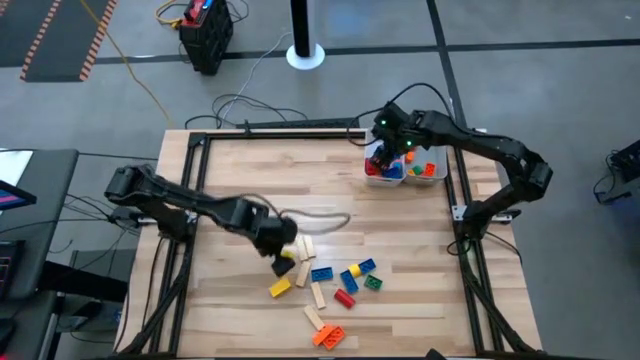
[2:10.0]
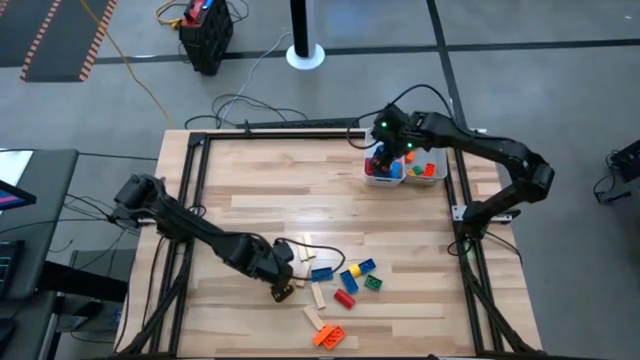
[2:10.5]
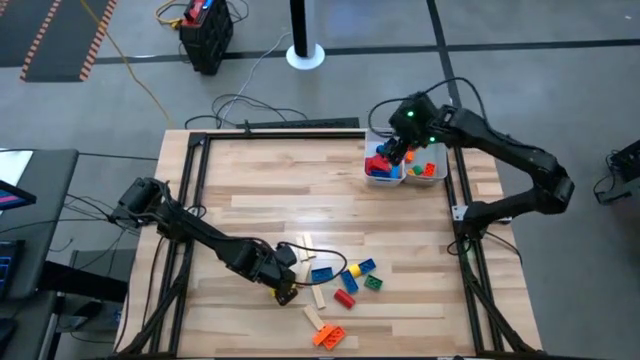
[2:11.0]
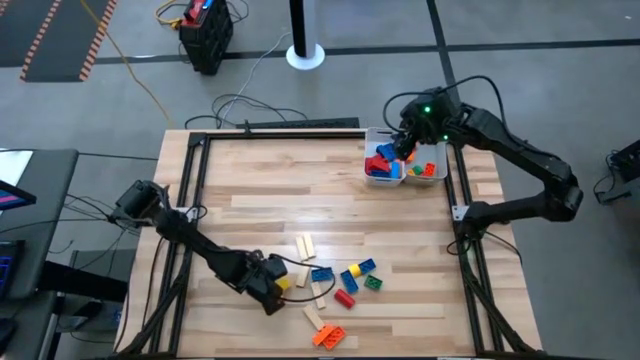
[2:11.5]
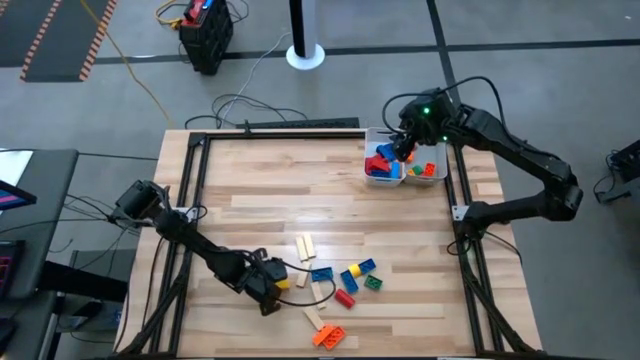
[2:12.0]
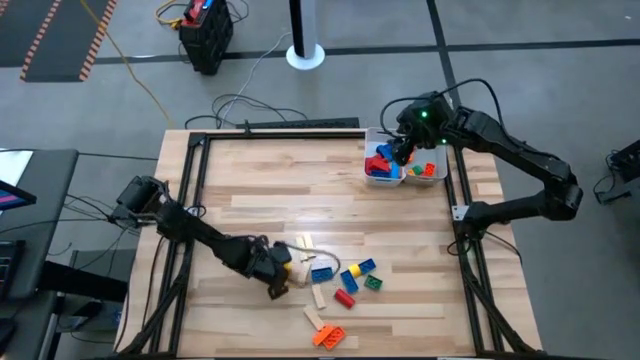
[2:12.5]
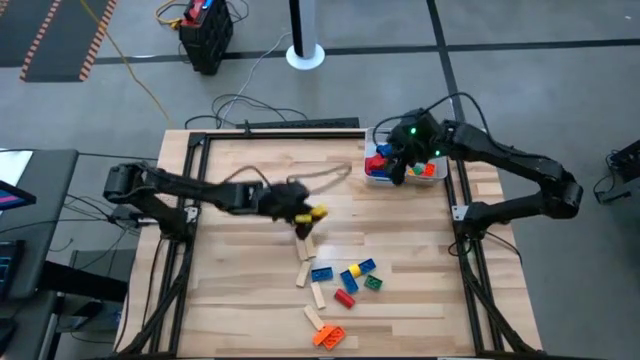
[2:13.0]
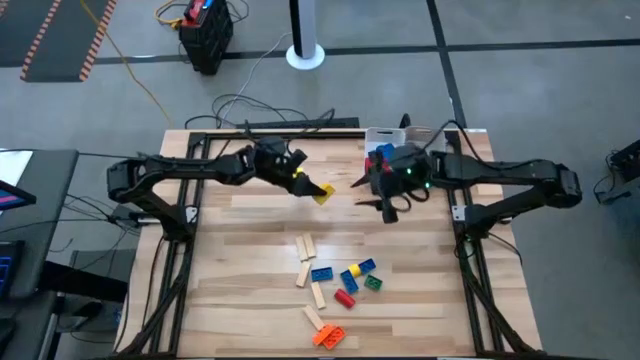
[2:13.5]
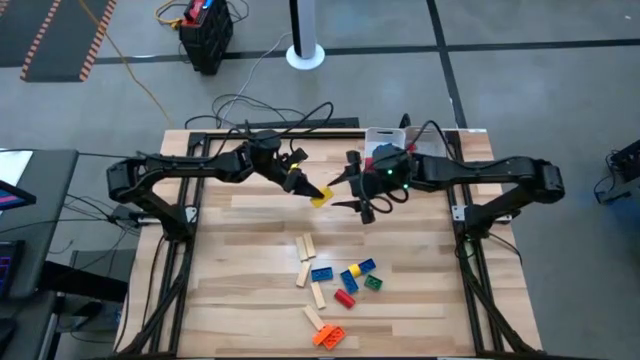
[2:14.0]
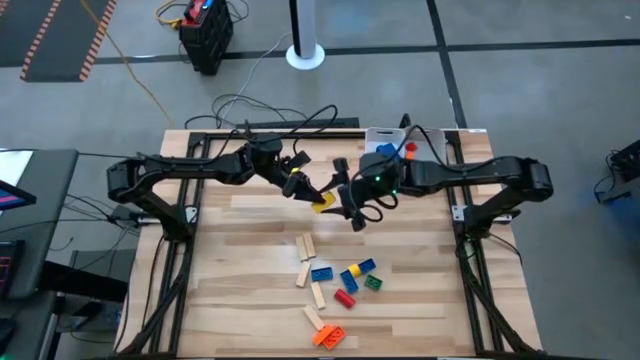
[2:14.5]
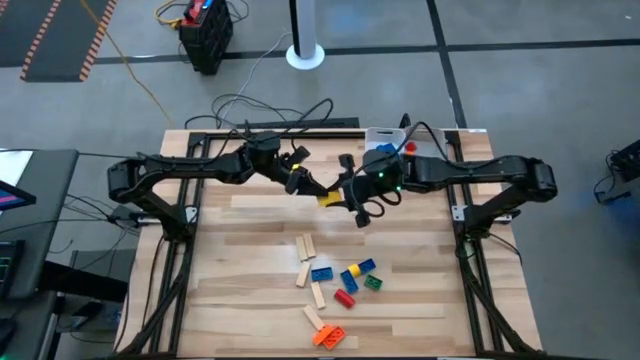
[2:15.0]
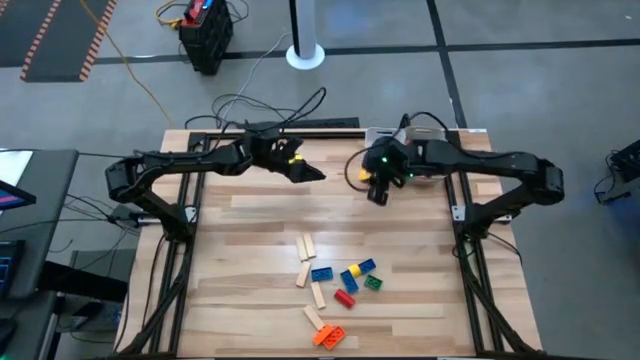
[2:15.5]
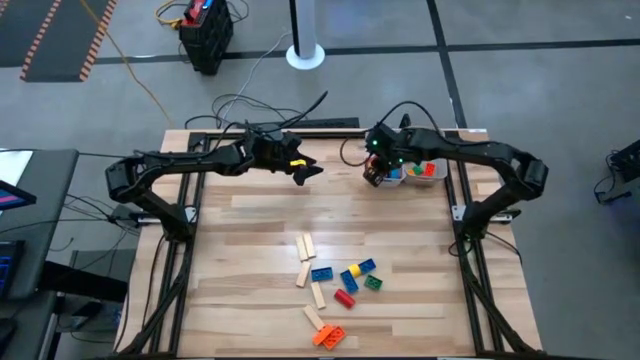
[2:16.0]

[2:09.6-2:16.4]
Task: Sort blocks by size
Put the large yellow wooden block into the white bin

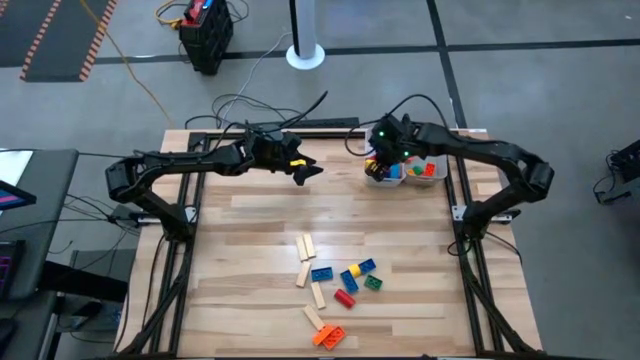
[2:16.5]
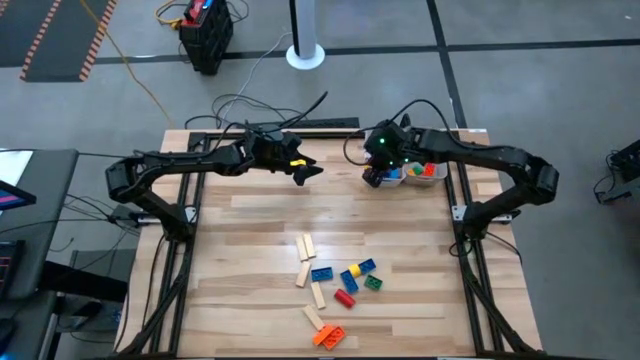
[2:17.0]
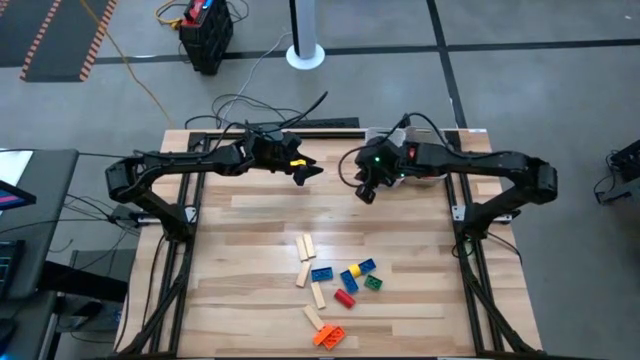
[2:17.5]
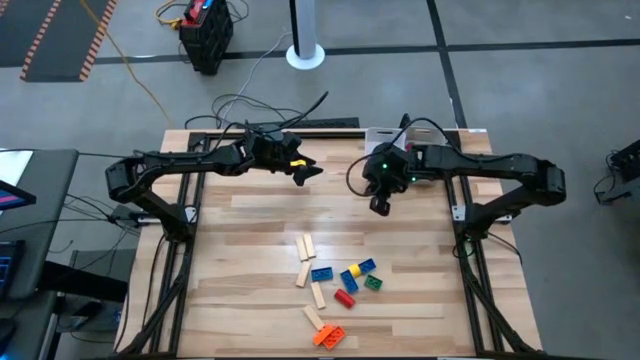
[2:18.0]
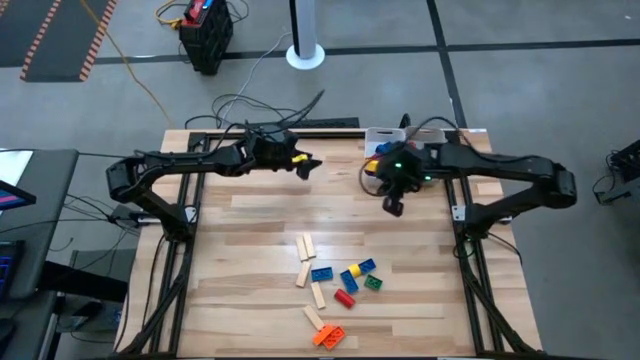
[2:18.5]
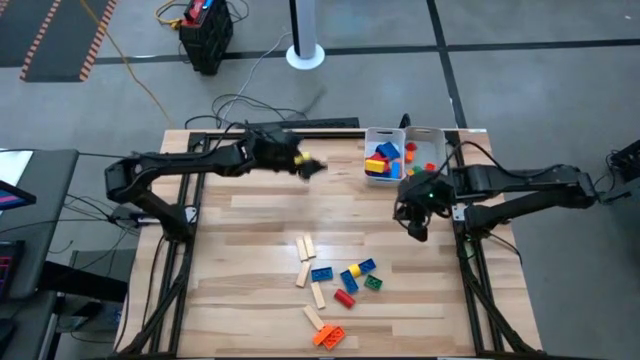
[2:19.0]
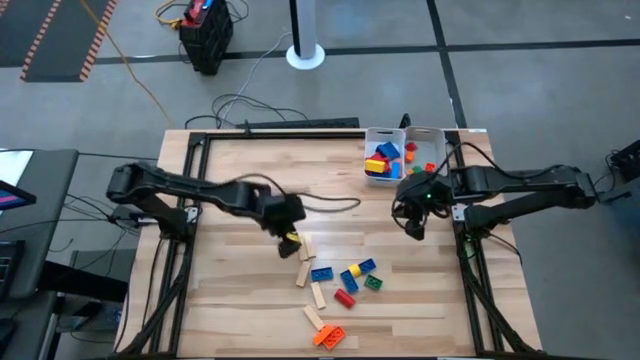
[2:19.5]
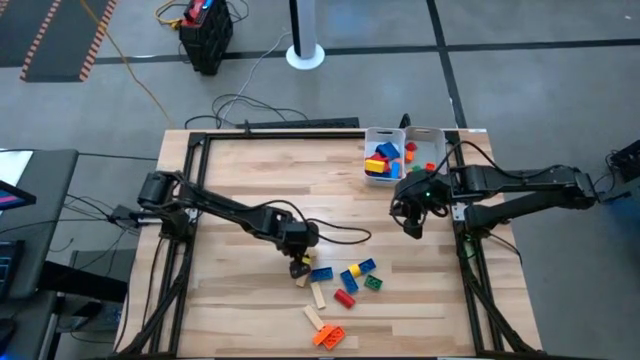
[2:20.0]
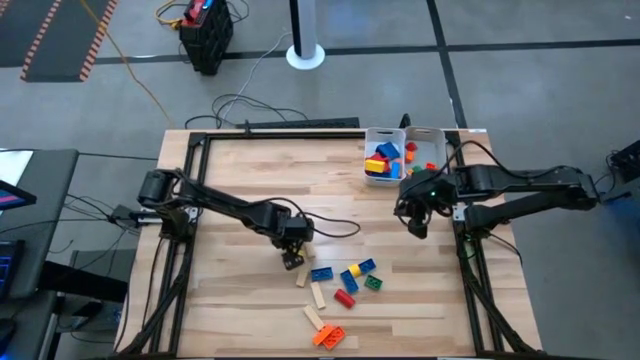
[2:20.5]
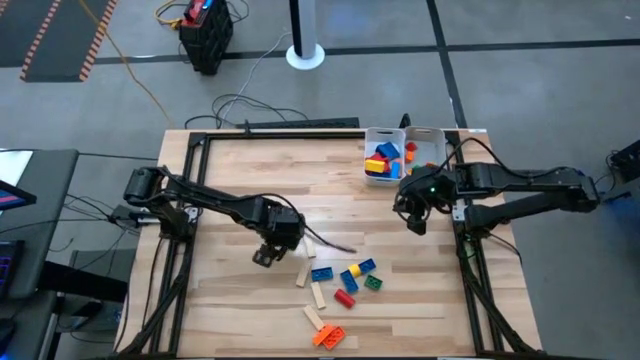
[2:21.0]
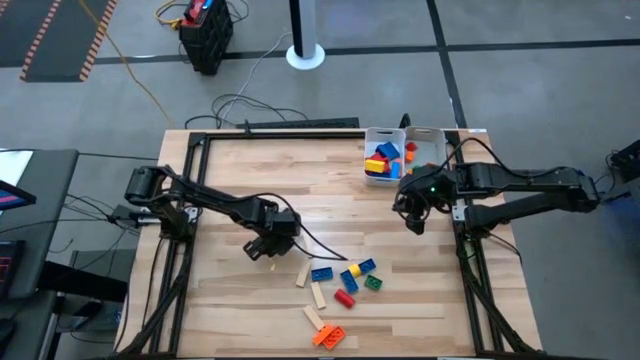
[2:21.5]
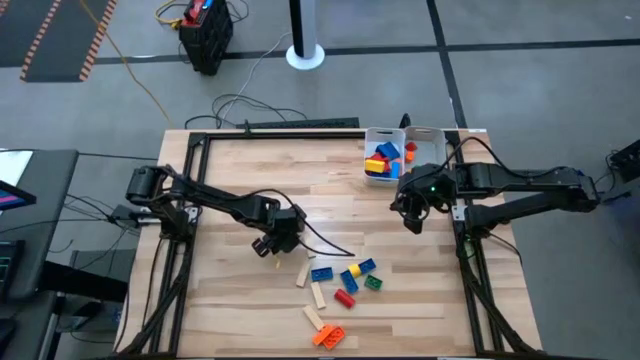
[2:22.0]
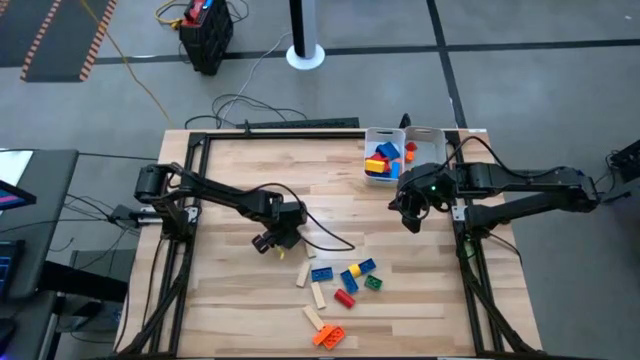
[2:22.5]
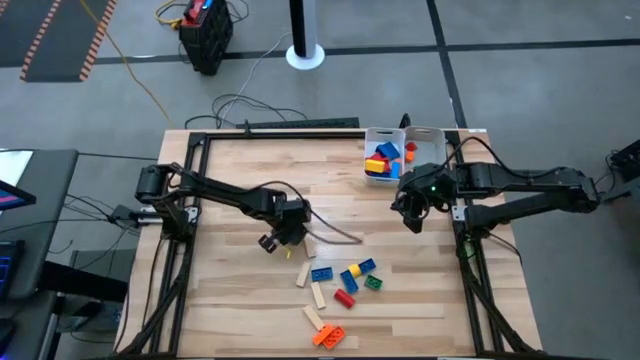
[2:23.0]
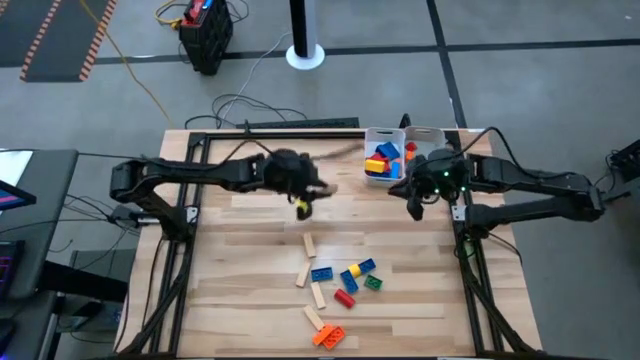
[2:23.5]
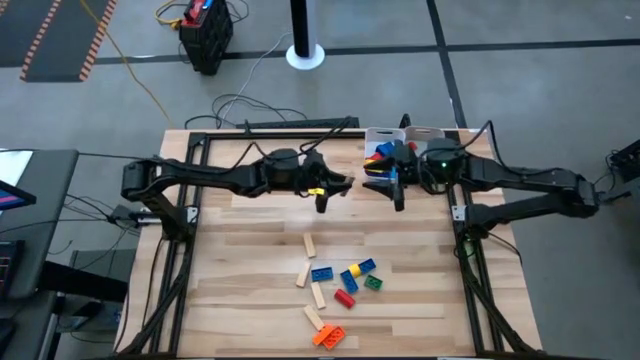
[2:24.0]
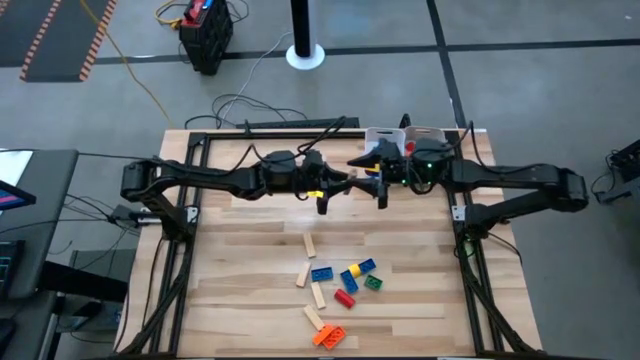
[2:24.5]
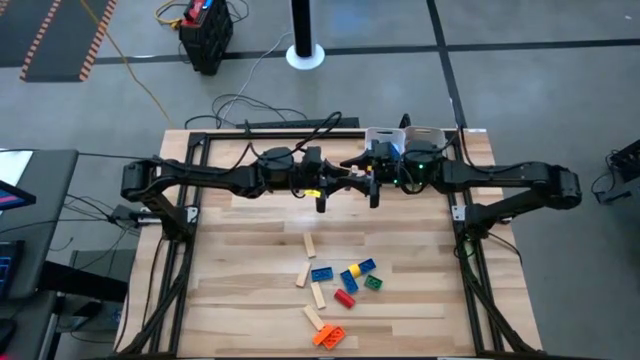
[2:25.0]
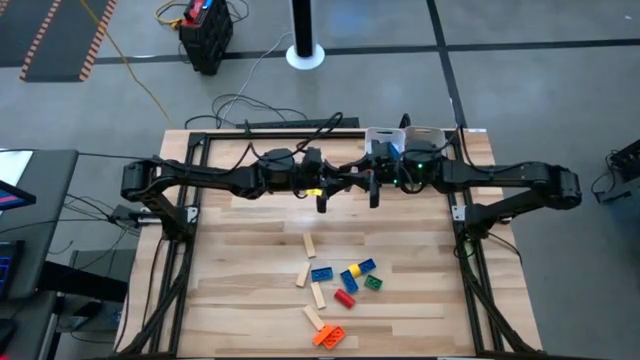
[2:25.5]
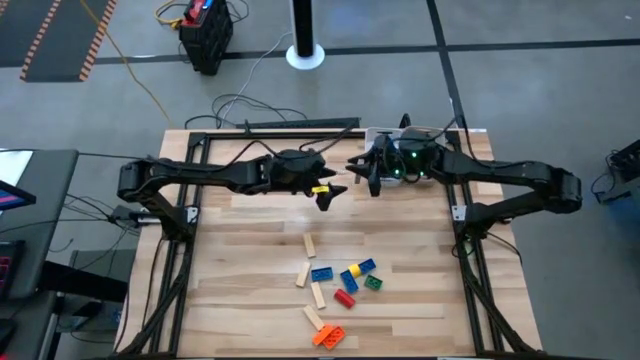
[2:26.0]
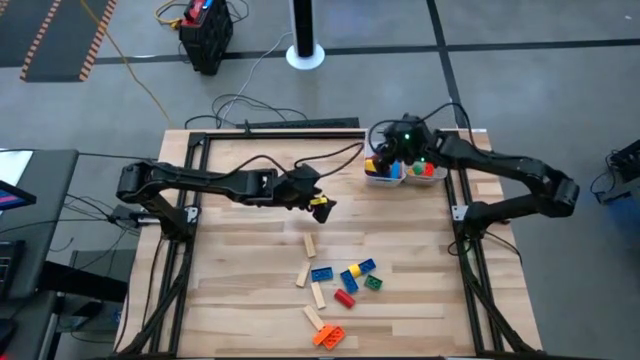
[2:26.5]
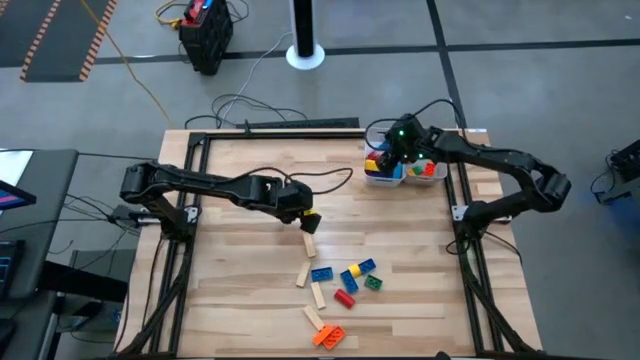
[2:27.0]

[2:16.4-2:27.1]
Put the large beige wooden block into the white bin

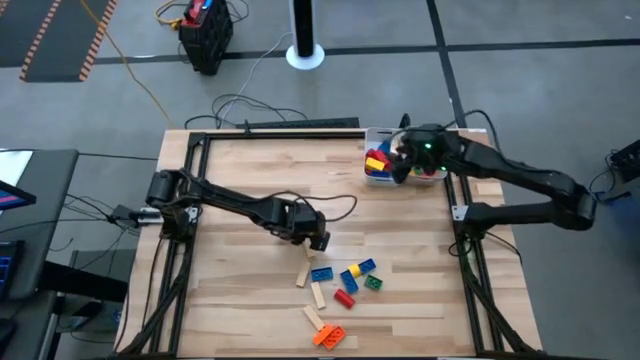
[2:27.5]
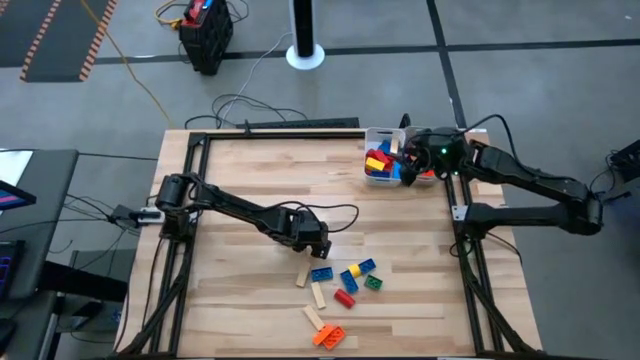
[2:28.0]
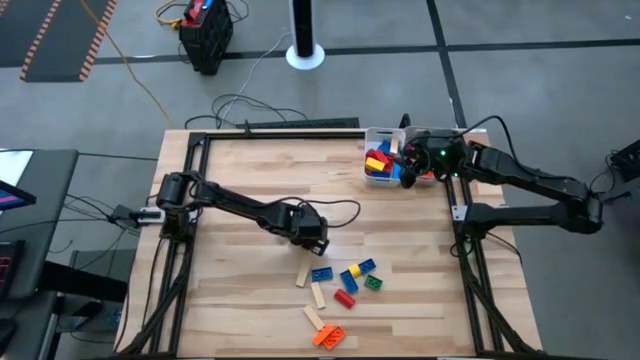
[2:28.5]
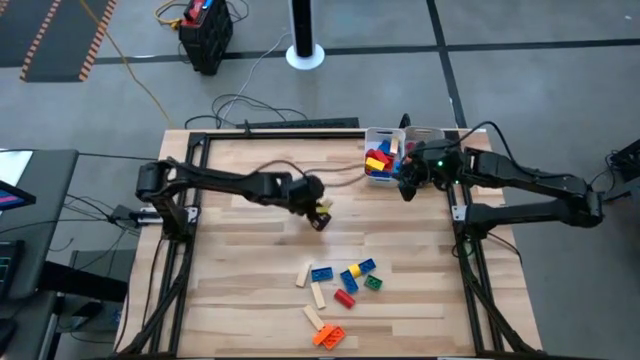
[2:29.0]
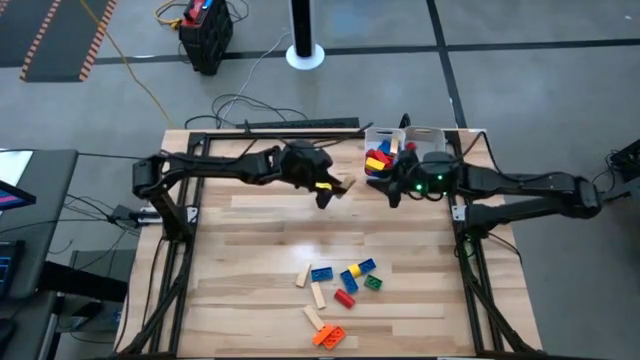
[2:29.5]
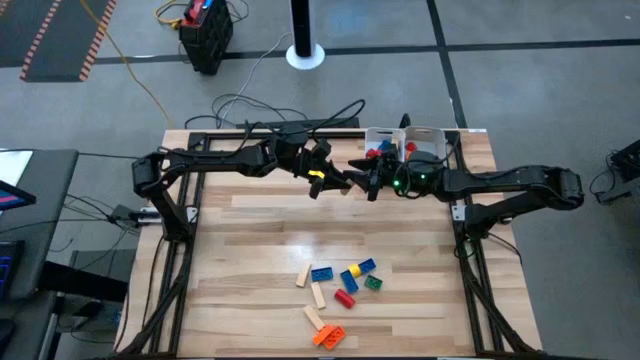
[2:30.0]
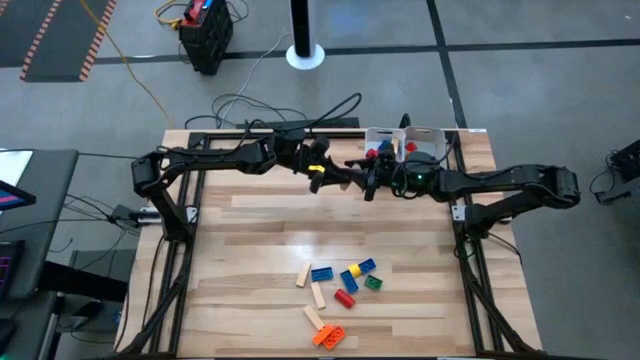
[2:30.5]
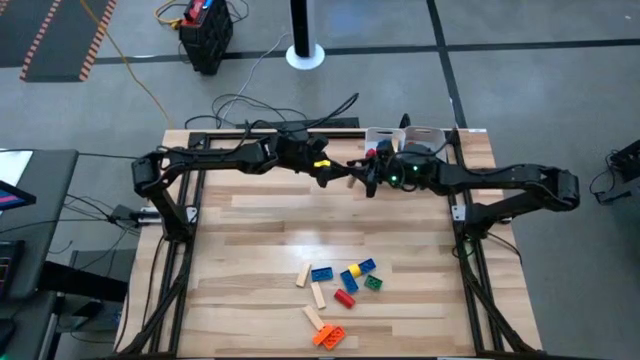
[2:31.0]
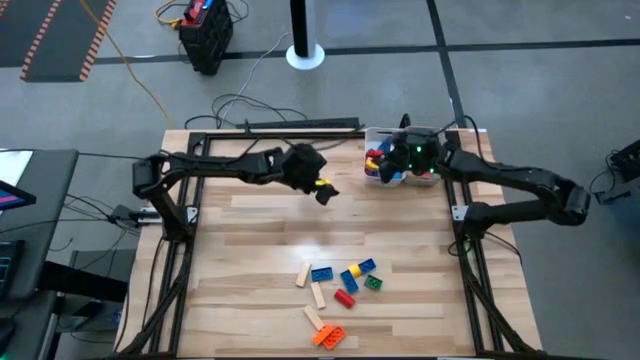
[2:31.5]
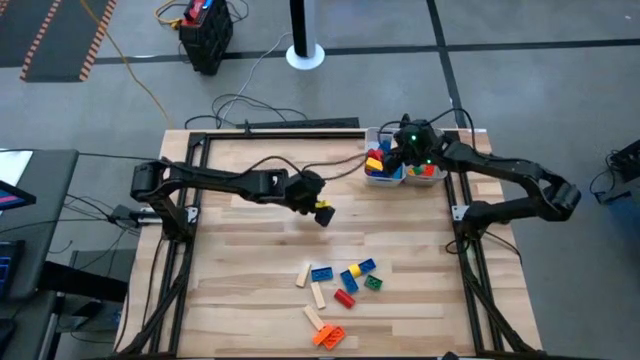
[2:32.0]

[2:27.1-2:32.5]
Put the large beige wooden block into the white bin
